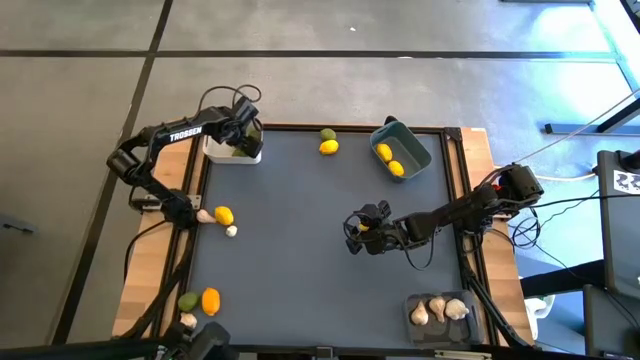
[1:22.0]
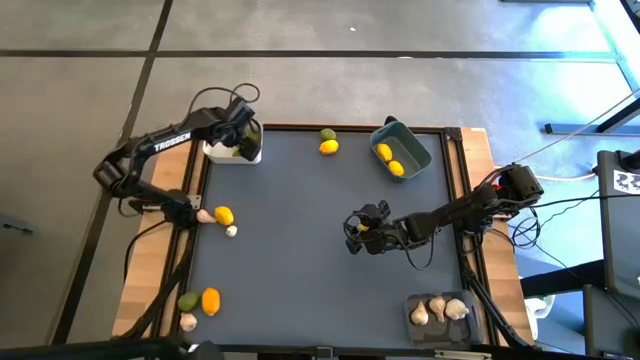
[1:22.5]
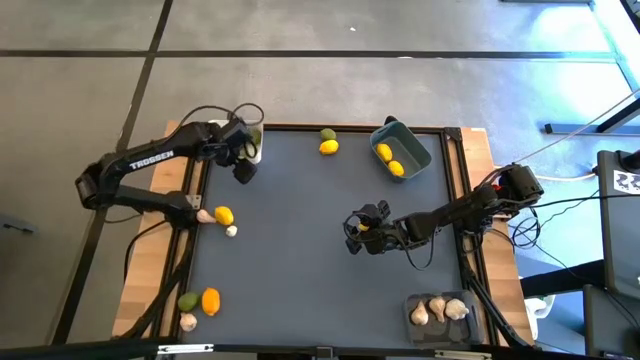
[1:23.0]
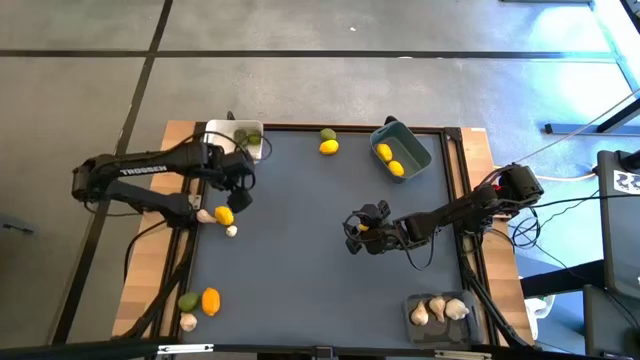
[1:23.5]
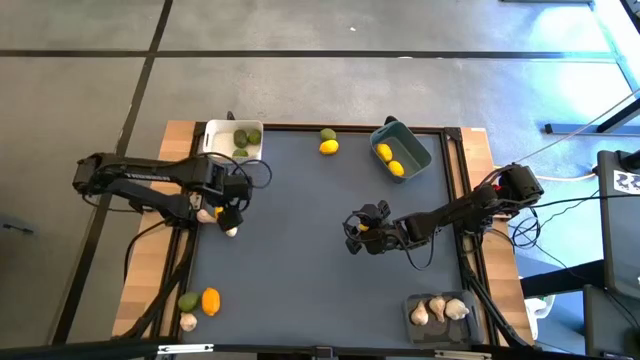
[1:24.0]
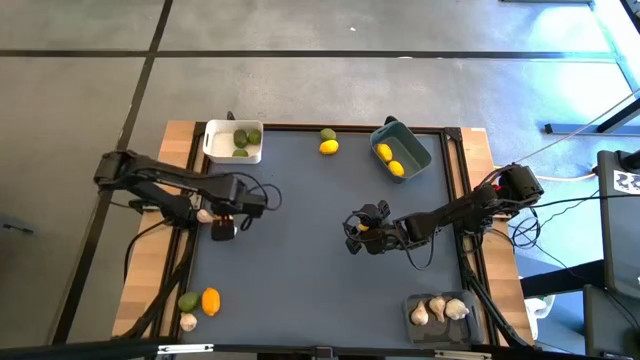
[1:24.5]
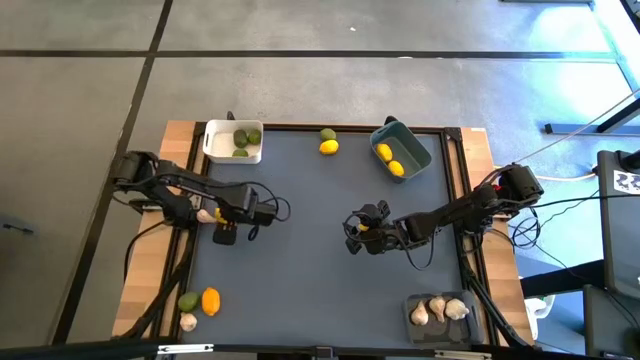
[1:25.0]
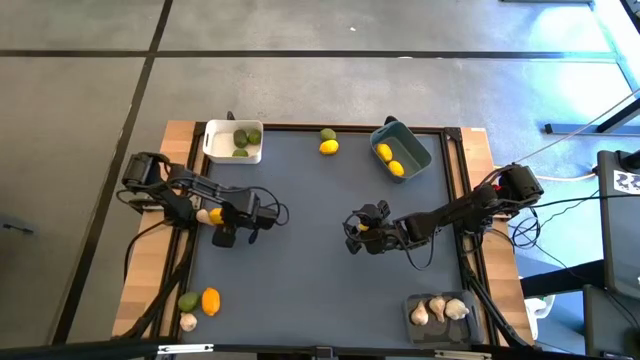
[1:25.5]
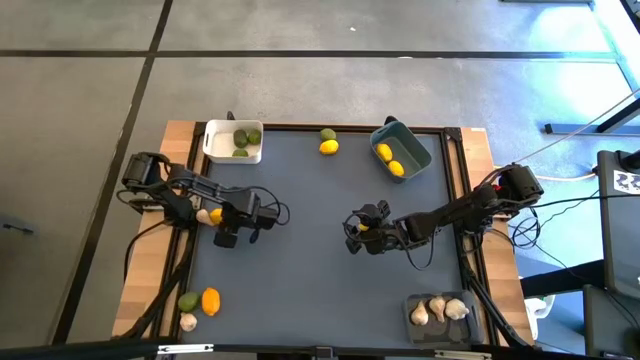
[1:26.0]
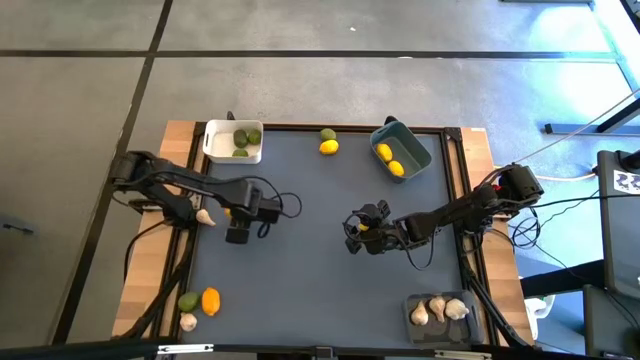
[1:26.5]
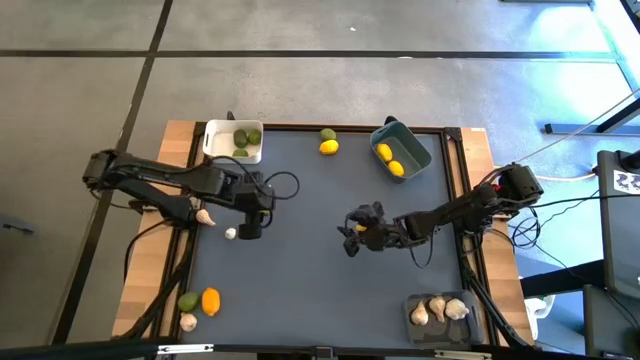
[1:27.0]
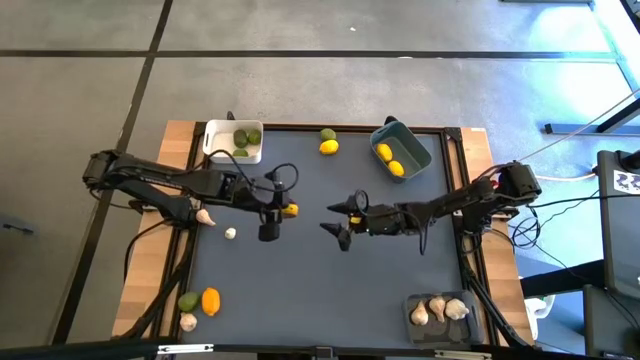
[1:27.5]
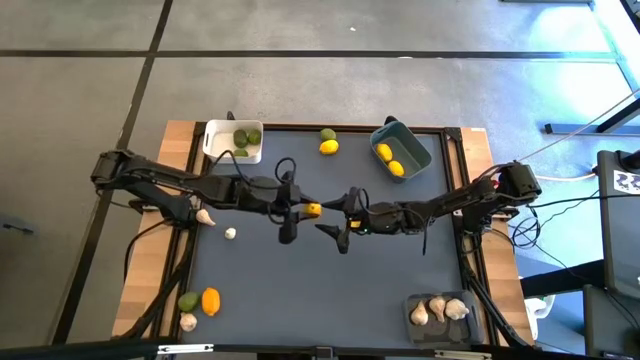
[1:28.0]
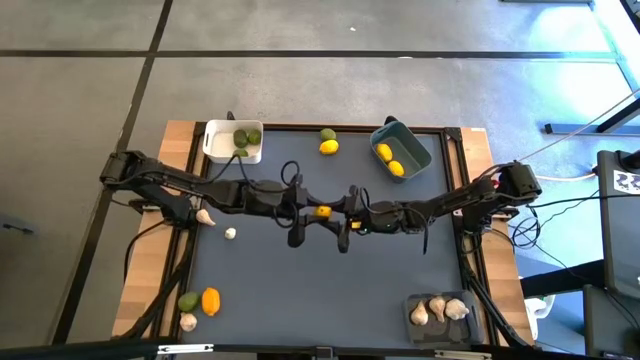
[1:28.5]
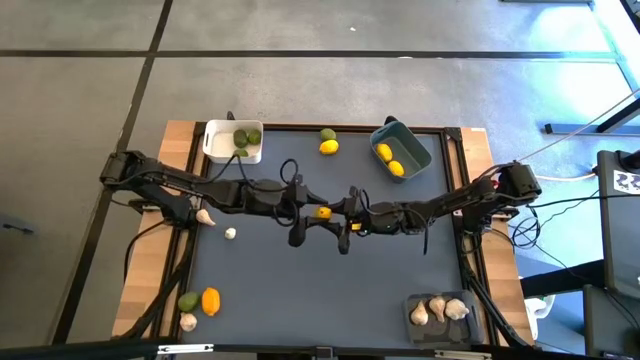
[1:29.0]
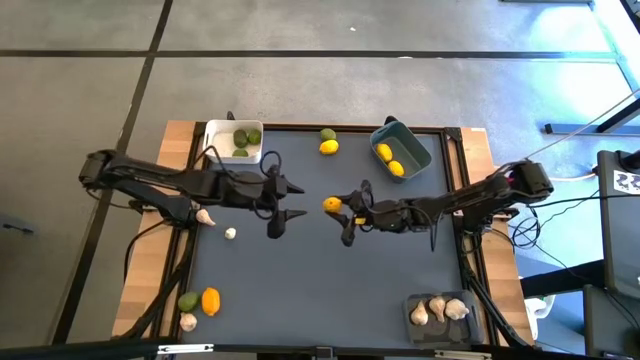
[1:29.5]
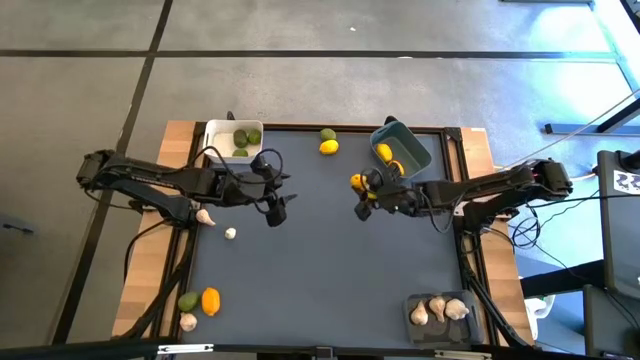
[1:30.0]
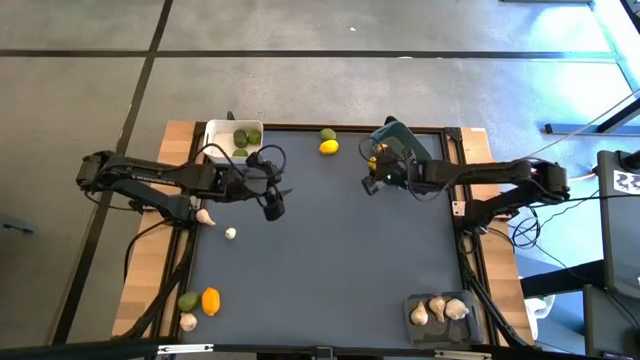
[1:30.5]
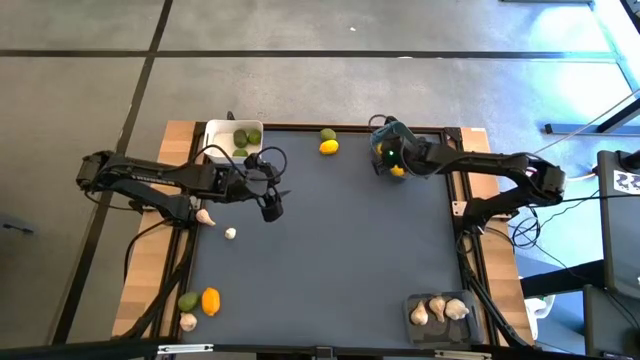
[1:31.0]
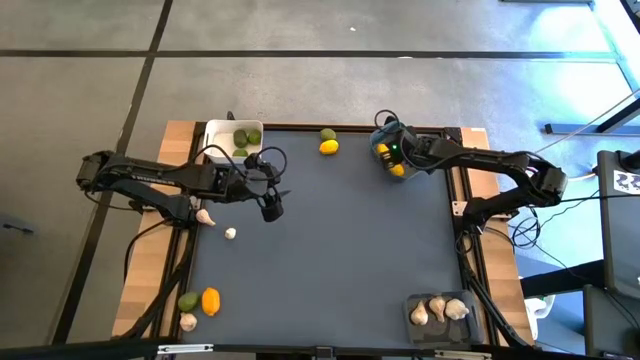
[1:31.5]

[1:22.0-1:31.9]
Task: Sort produce into baskets
Put the lemon into the blue bin

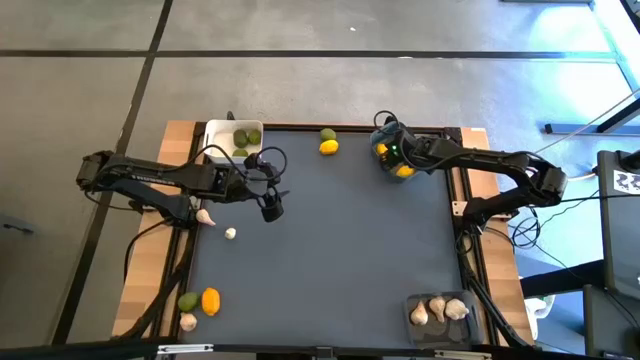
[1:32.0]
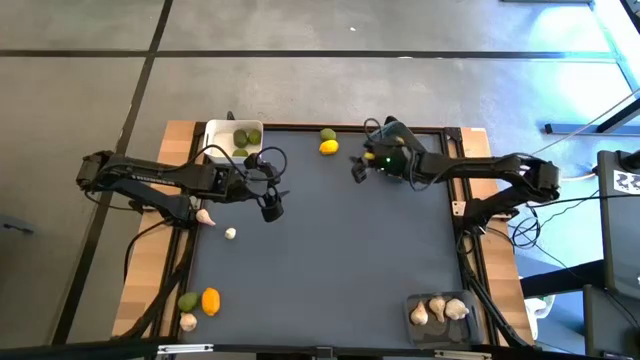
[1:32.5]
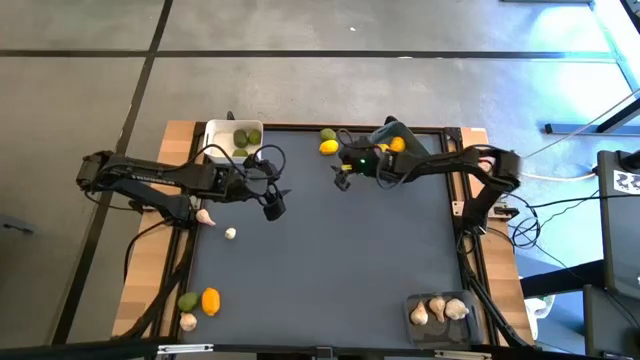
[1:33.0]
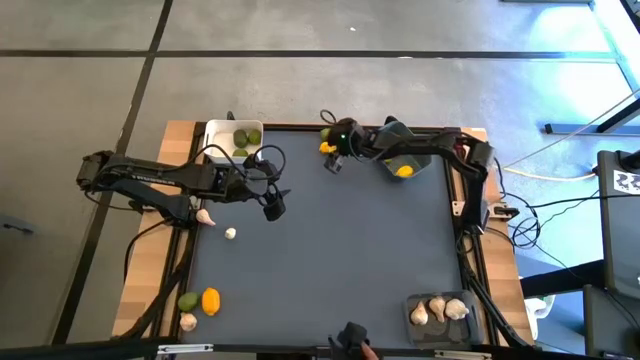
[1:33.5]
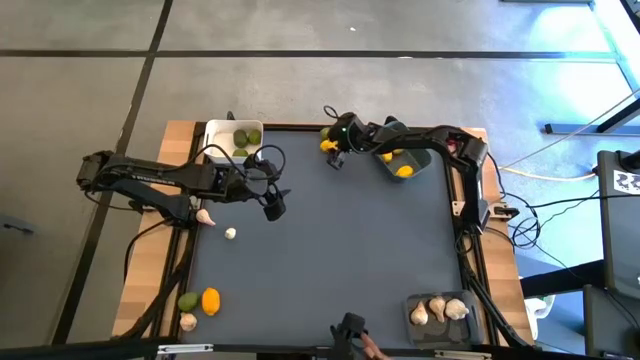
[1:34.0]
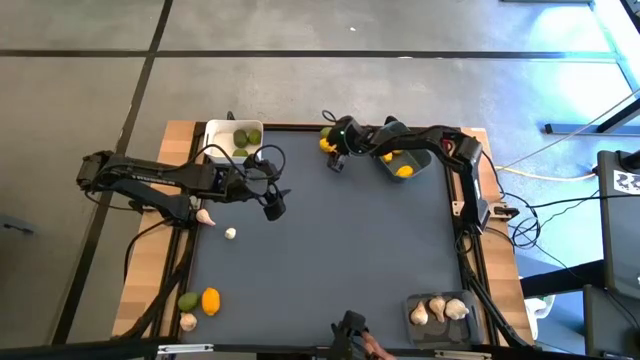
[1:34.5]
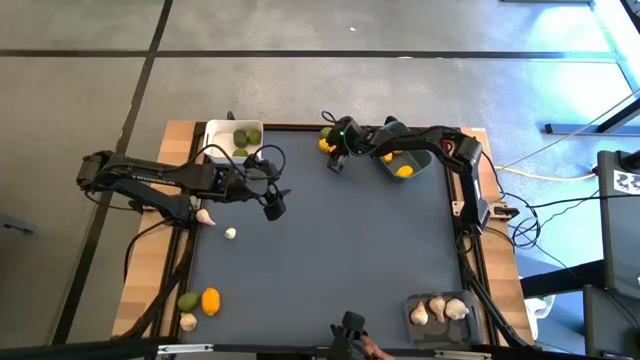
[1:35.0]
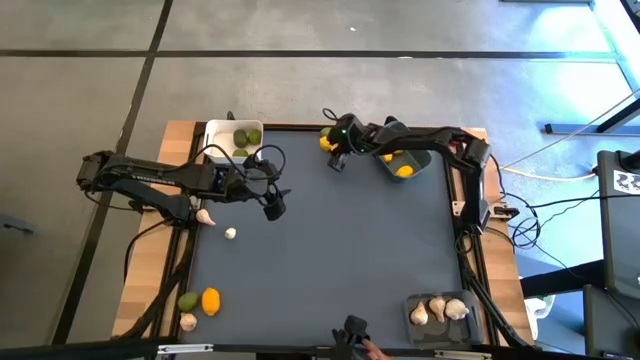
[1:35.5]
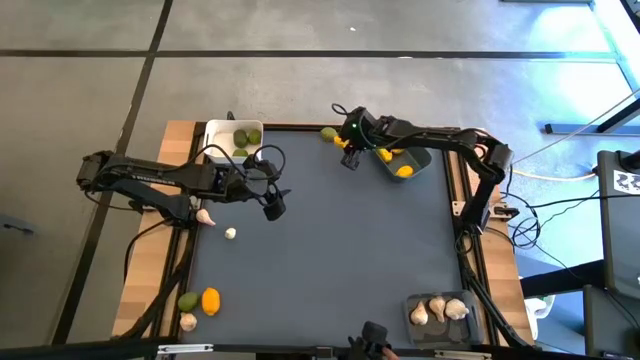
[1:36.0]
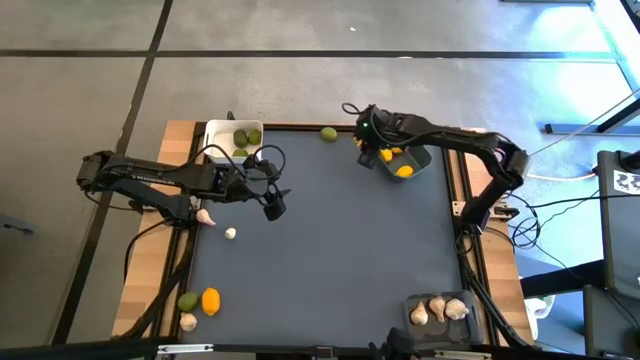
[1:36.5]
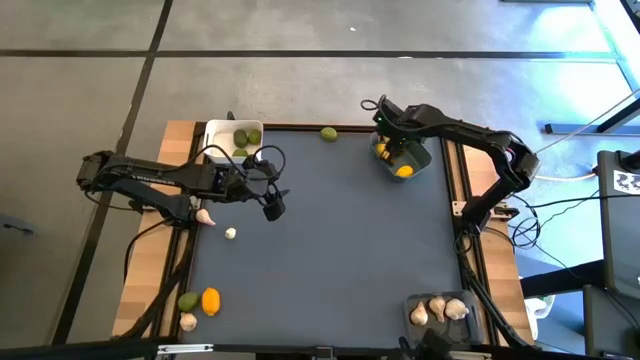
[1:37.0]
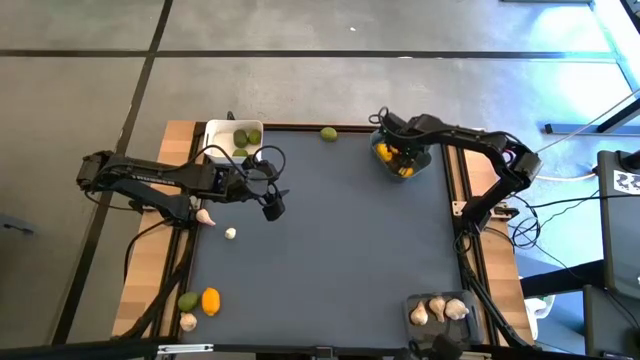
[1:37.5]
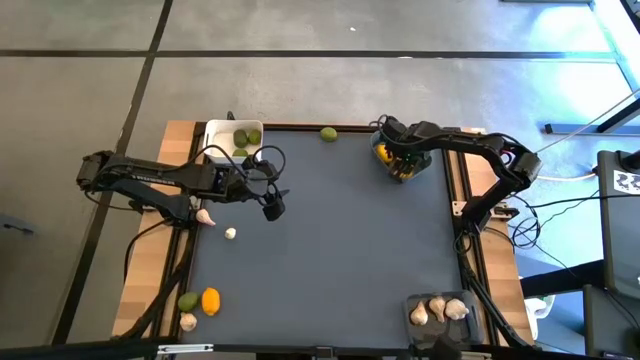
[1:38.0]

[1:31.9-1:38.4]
Put the lemon into the blue bin

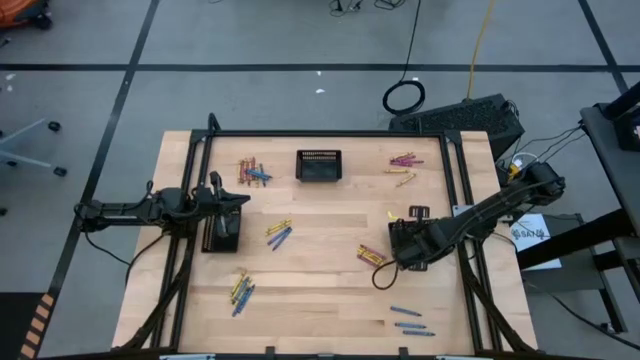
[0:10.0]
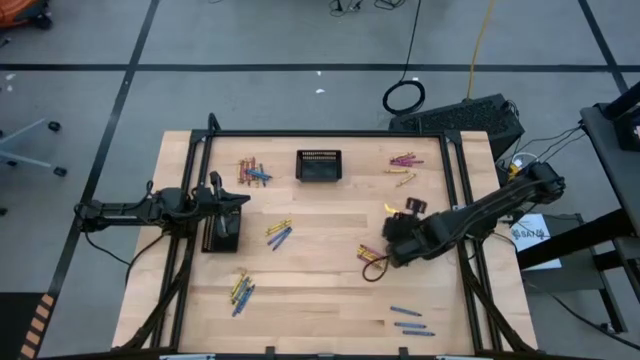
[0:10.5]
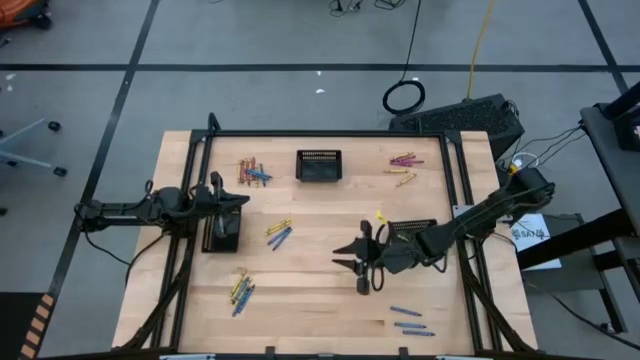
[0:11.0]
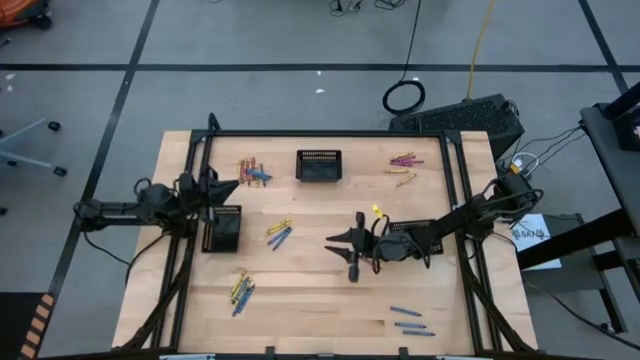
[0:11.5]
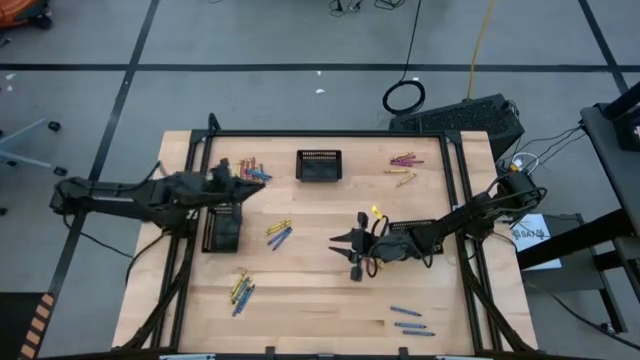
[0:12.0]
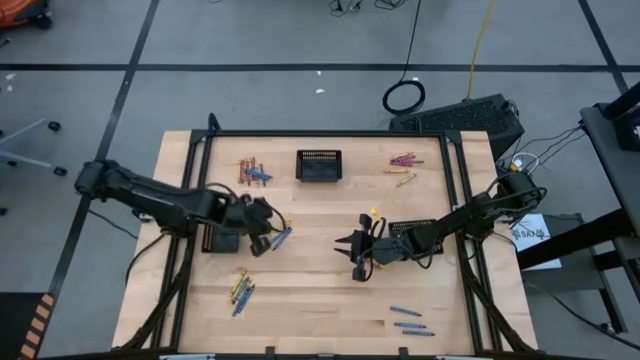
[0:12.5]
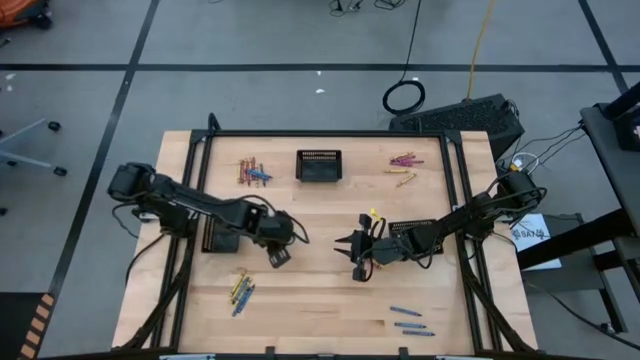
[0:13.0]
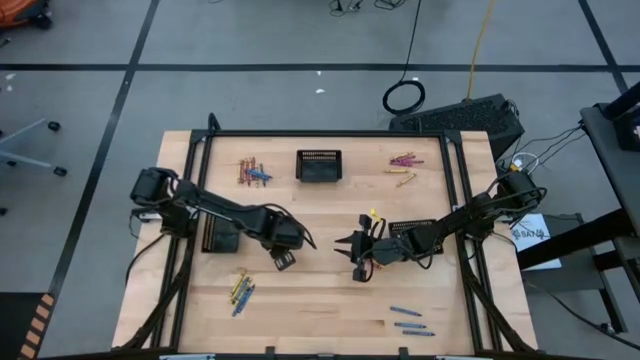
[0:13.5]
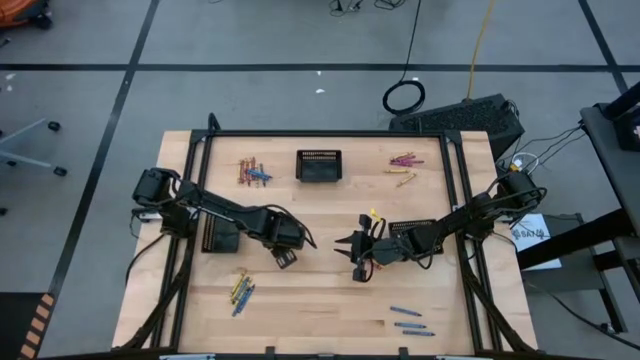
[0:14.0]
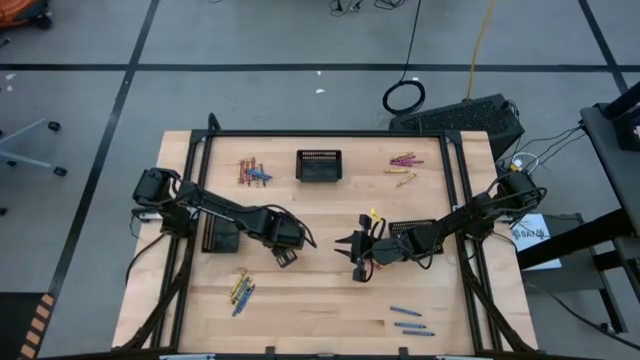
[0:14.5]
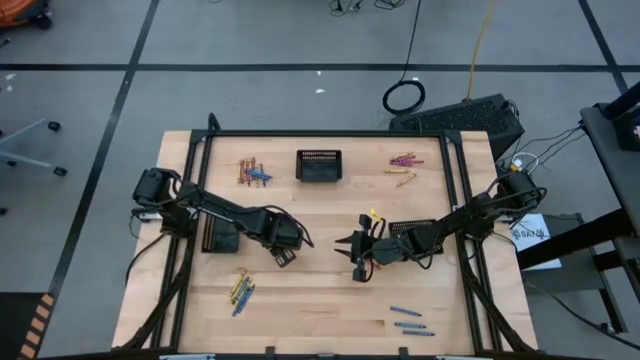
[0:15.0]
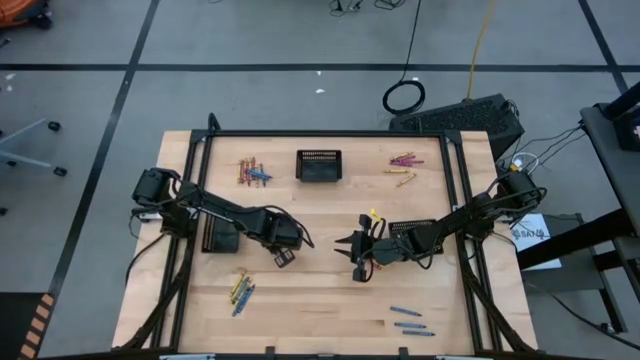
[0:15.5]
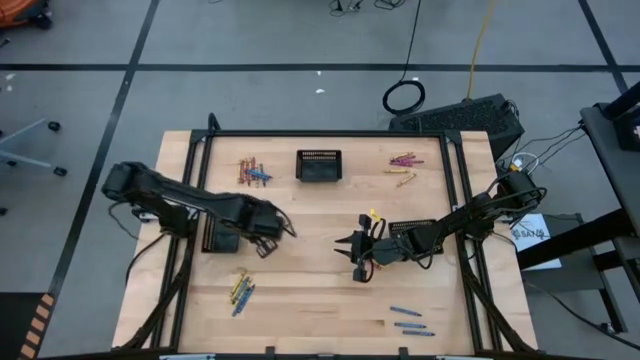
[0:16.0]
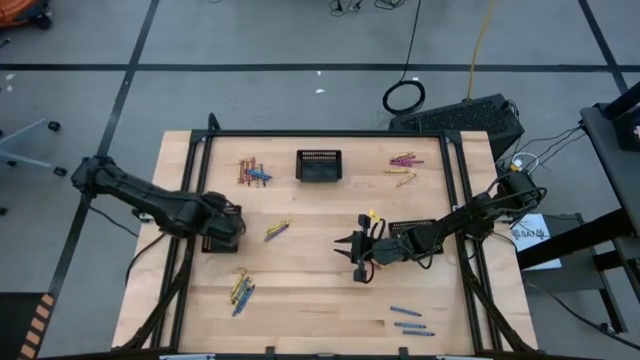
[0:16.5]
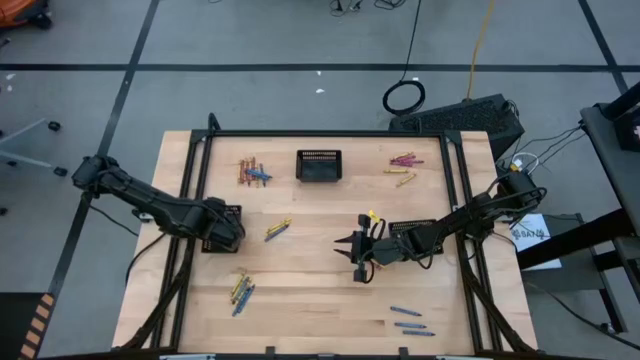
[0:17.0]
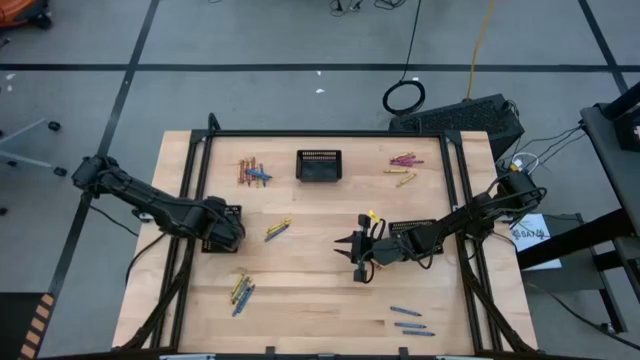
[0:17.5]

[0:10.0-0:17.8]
Task: Sort crayons
Put the blue crayon into the bottom left black bin
